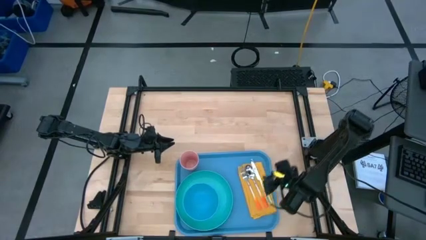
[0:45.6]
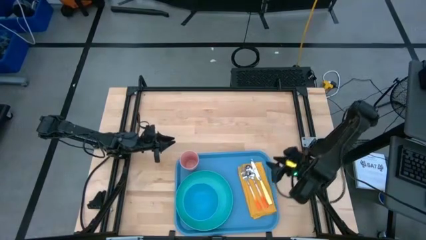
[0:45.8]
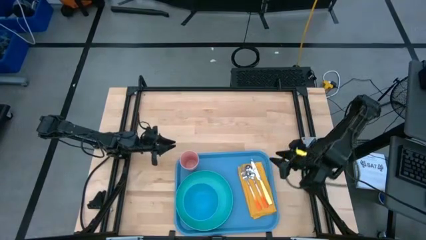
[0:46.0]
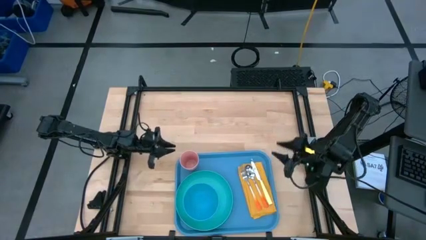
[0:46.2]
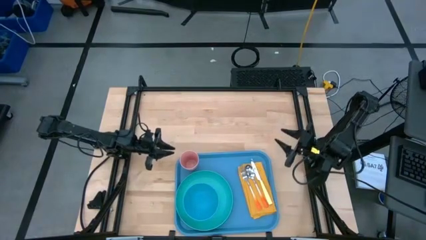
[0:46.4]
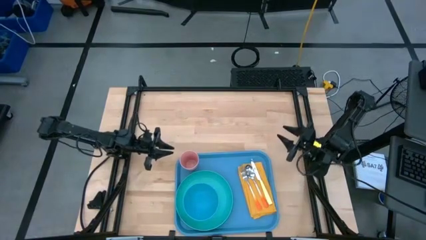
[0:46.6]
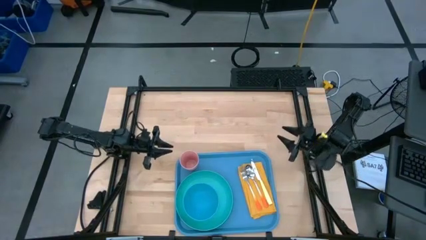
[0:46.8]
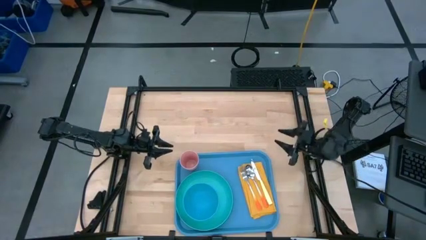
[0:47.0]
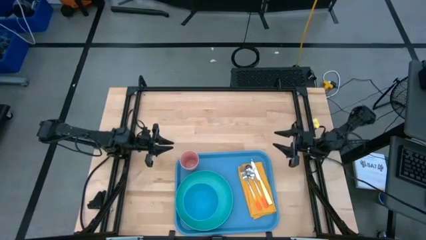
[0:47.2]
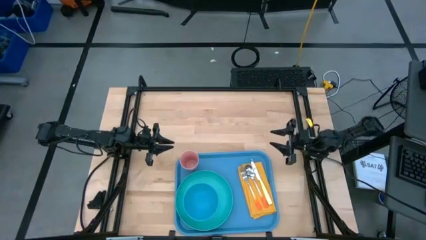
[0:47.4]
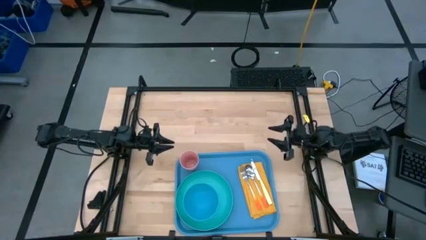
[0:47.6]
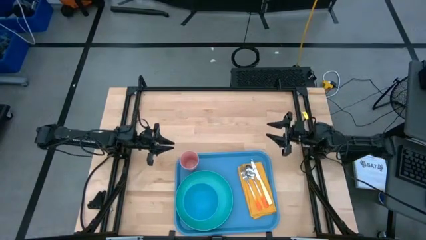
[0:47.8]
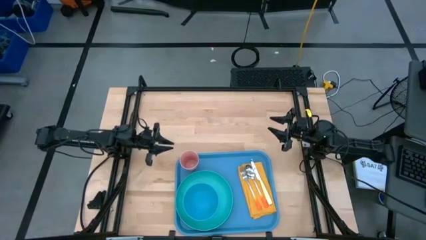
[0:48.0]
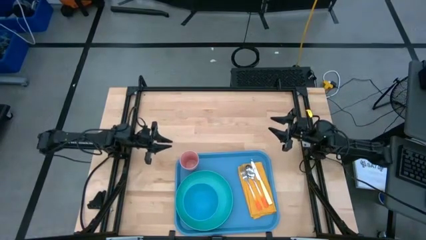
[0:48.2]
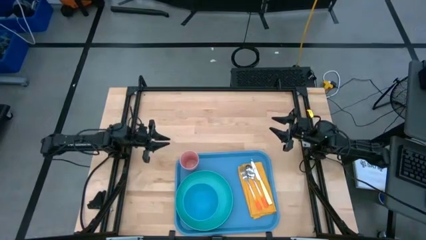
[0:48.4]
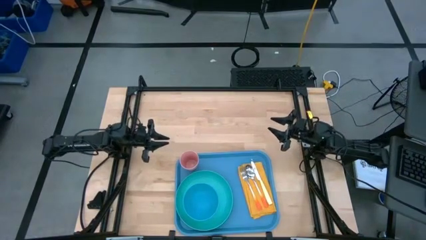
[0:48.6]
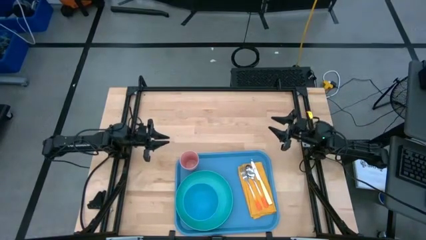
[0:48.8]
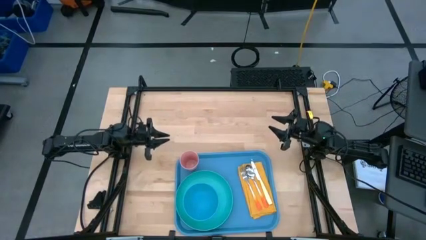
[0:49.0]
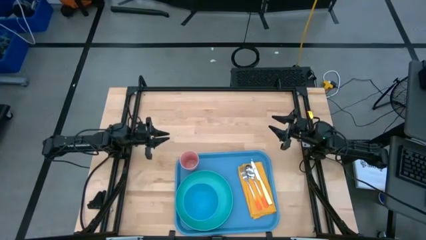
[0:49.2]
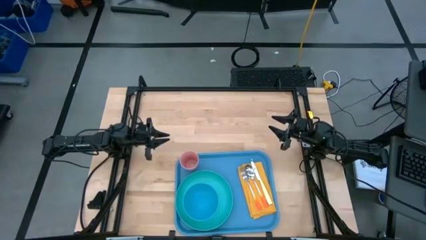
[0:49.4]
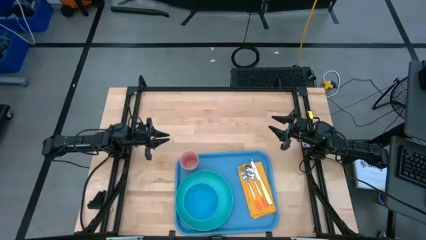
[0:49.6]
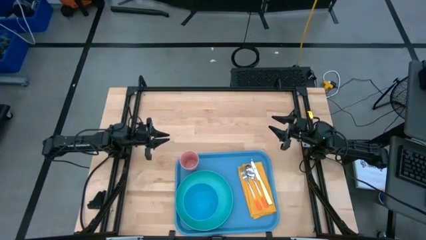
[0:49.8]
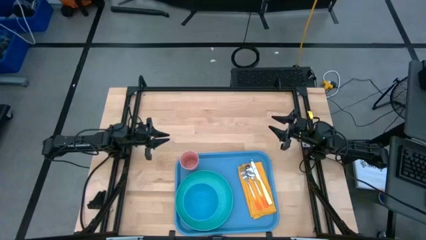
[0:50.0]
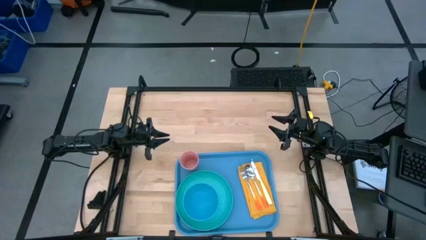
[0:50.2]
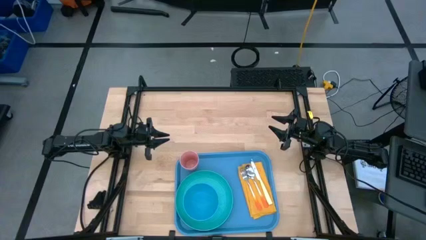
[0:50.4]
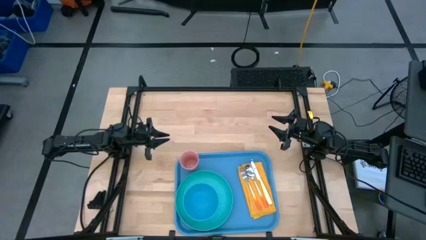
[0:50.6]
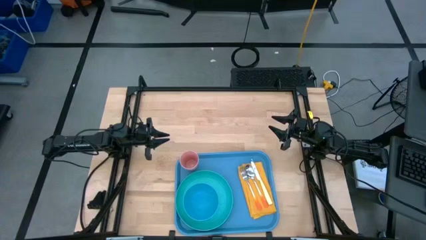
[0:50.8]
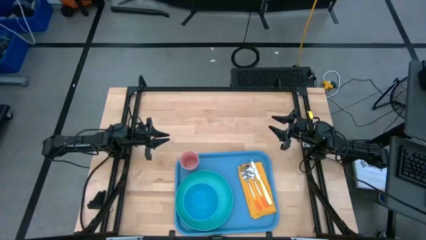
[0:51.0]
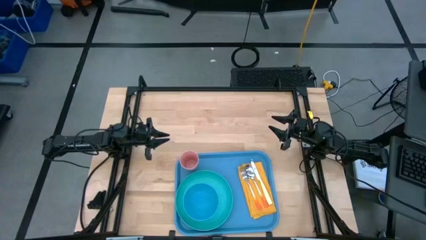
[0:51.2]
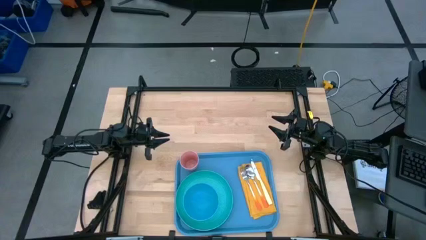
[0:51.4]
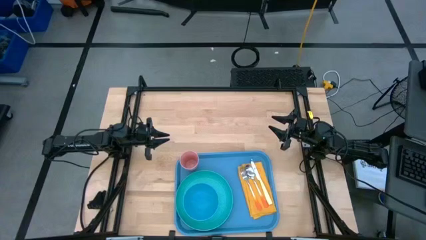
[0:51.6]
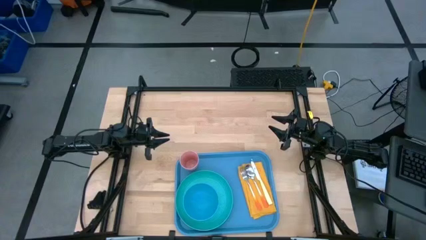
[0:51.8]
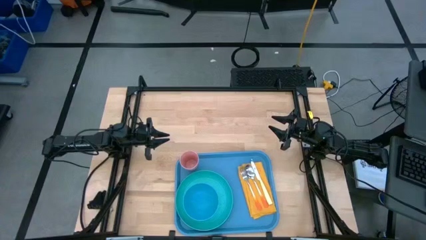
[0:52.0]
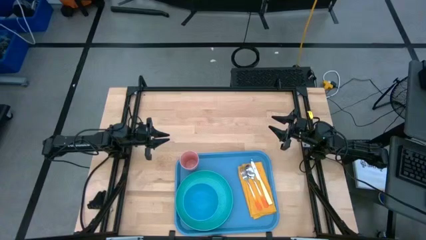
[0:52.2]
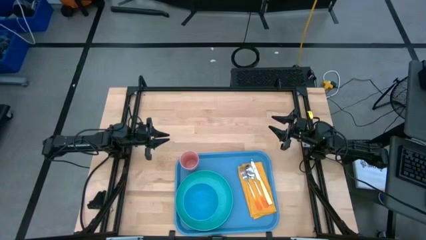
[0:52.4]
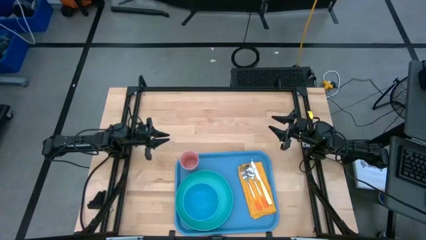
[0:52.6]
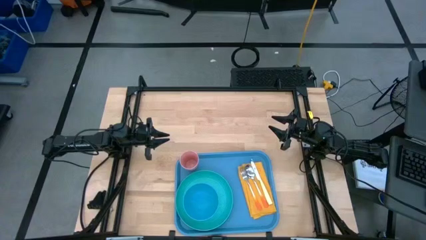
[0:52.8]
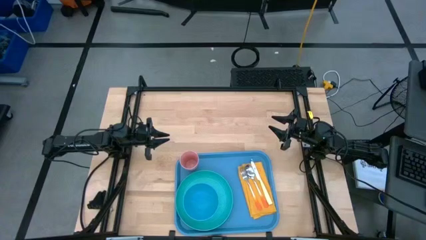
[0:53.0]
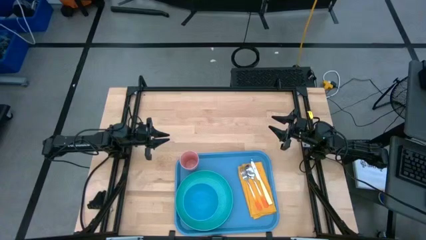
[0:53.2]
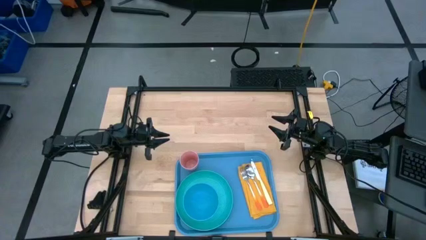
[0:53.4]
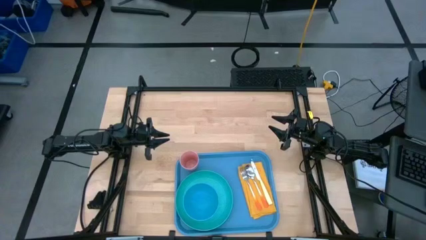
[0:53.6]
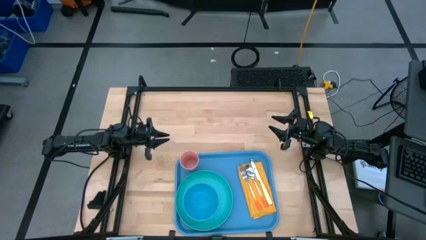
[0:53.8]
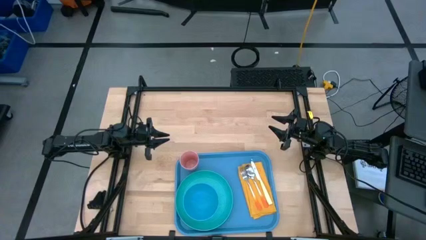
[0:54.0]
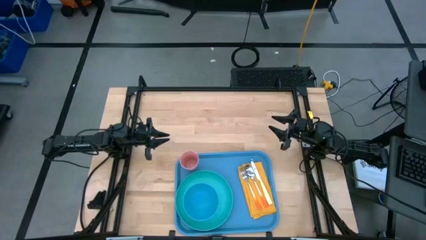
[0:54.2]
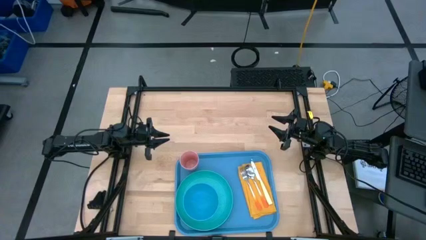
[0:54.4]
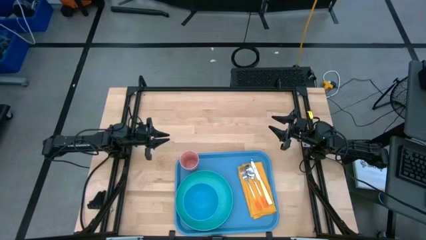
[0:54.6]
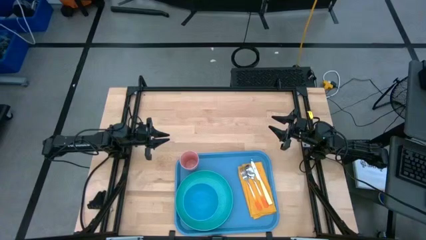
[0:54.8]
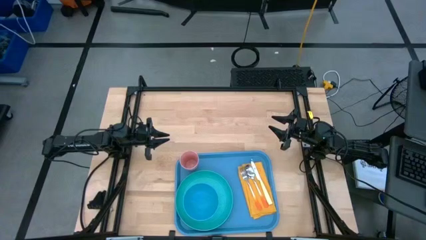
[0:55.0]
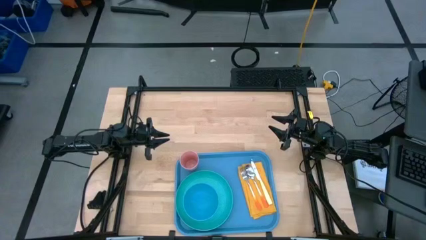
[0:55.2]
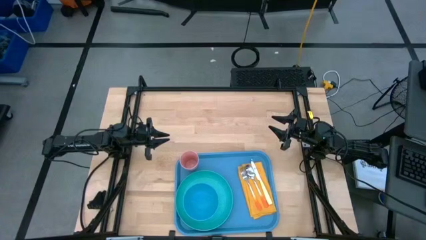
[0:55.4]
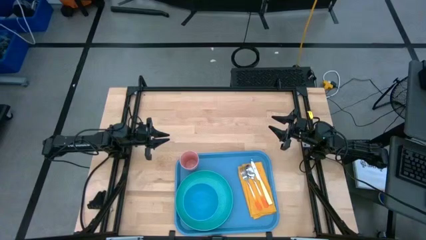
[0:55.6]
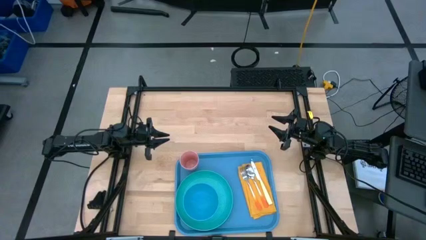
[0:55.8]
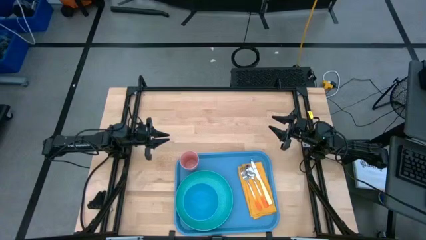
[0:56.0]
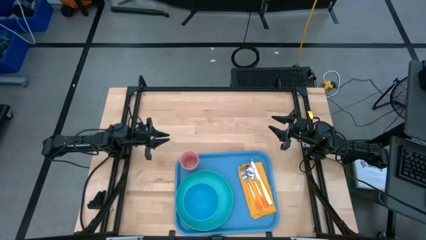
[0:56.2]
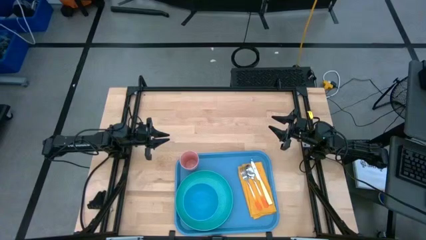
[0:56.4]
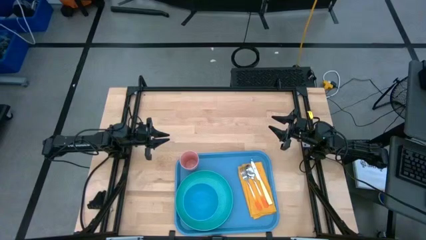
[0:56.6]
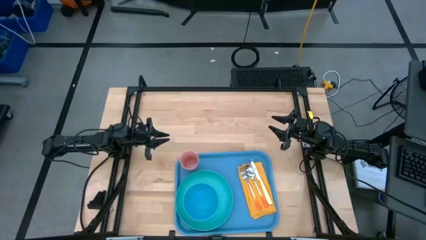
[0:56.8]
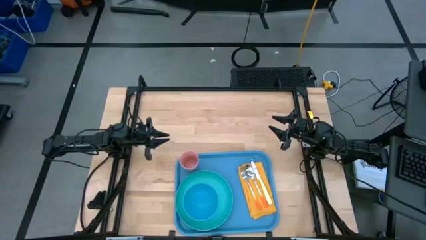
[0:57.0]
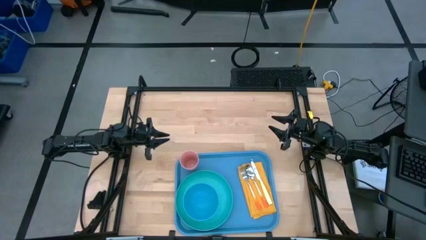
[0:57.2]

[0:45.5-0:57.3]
Task: Set up tray
Return to Home Position

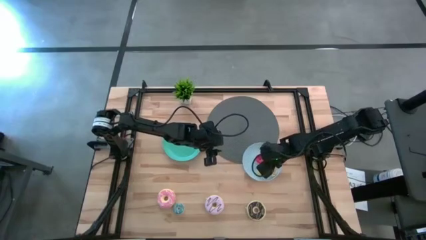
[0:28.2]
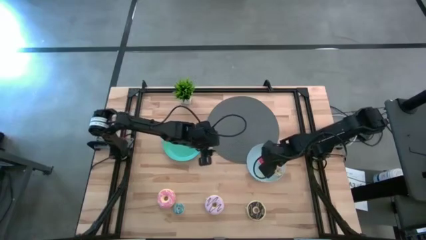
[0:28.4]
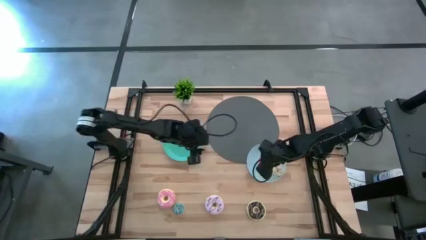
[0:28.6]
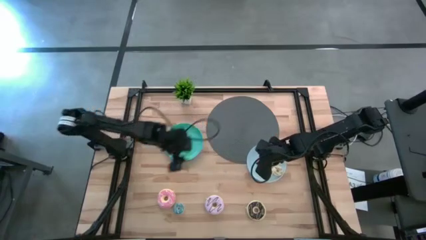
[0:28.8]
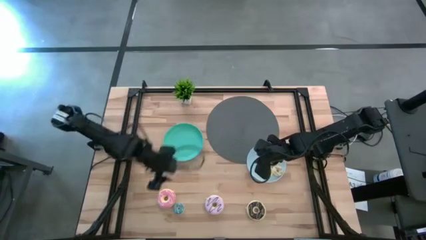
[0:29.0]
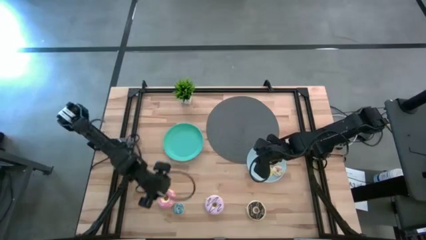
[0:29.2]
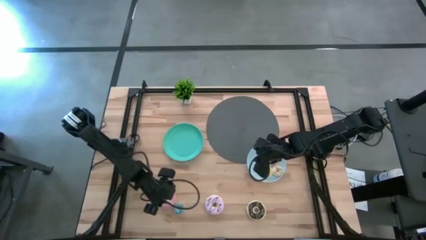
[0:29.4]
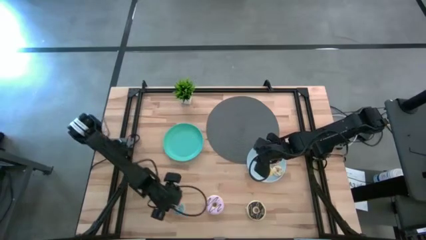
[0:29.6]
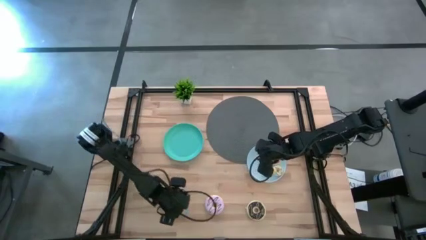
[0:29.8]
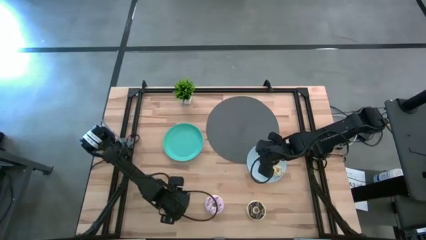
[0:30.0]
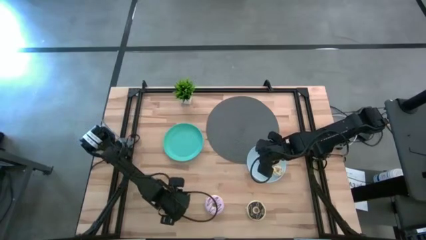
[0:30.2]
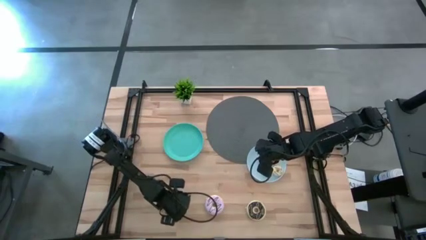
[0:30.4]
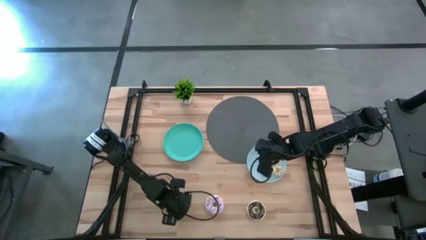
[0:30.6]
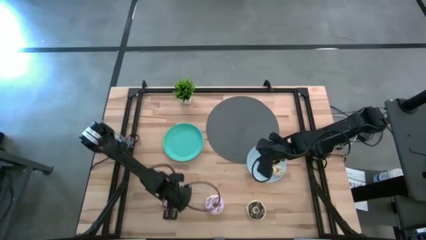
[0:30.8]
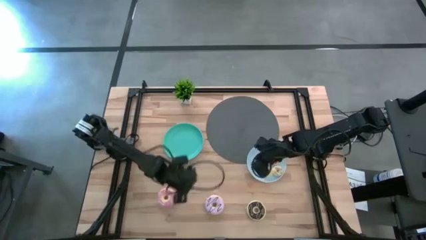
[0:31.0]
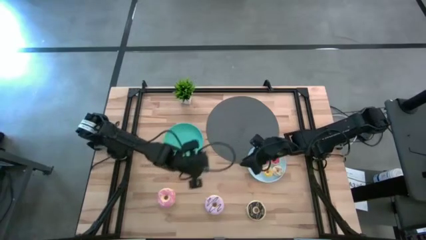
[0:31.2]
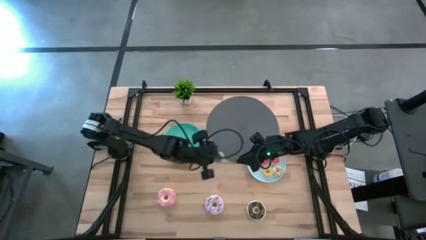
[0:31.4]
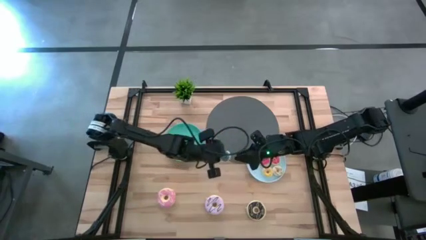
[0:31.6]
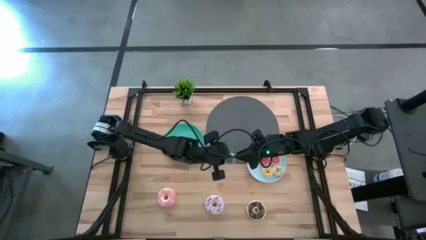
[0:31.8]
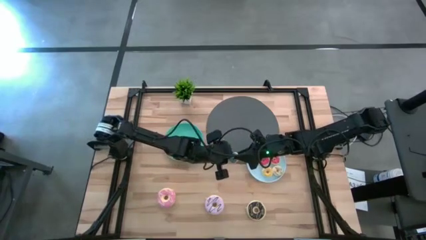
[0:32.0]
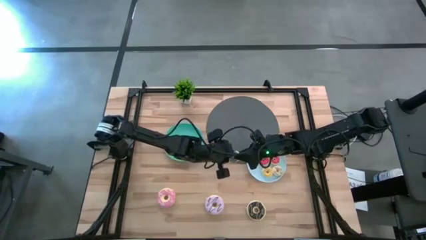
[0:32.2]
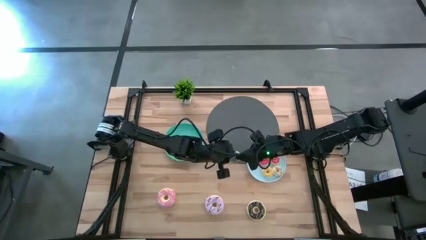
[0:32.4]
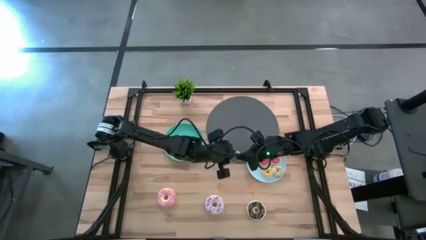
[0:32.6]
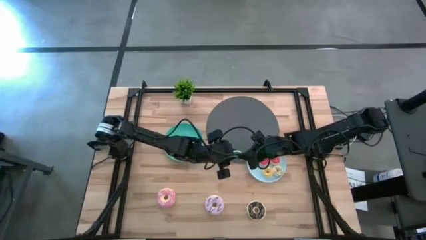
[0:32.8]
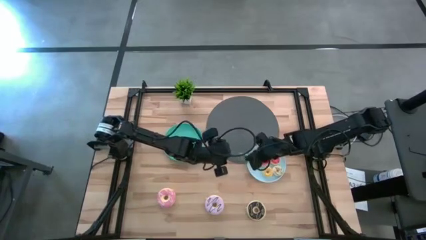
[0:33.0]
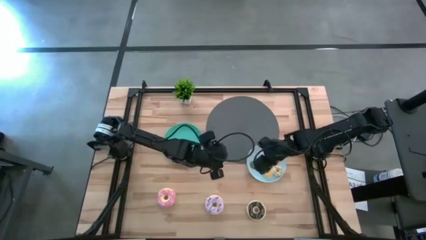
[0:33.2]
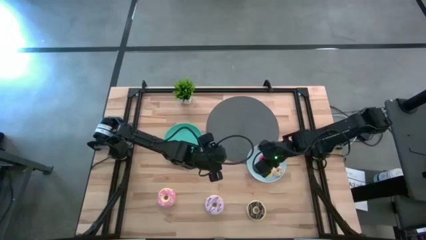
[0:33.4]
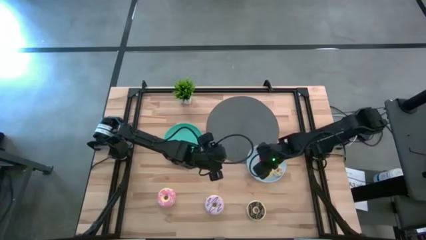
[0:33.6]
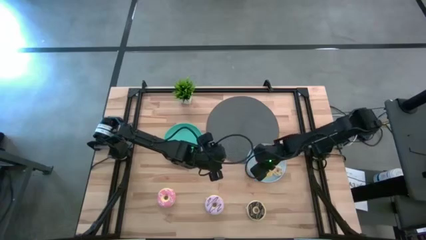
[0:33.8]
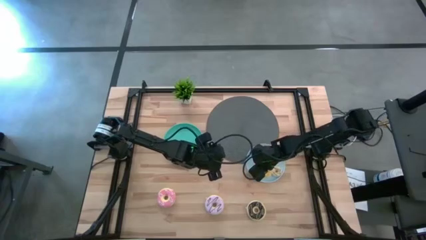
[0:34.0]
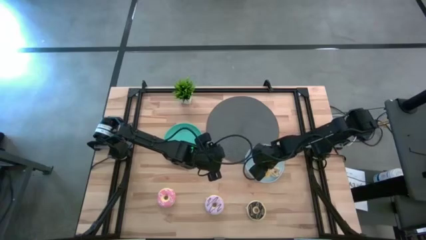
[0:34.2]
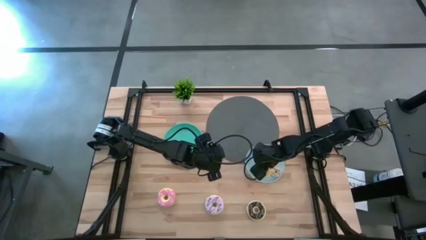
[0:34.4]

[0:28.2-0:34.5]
Task: Pick & Place donuts
Put the small blue donut on the blue plate
